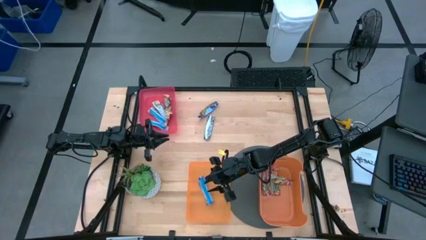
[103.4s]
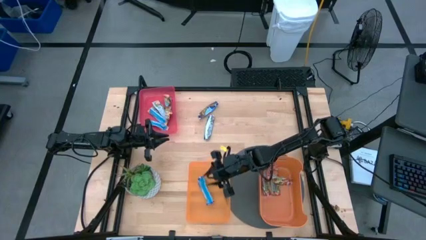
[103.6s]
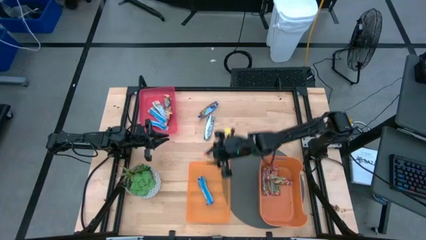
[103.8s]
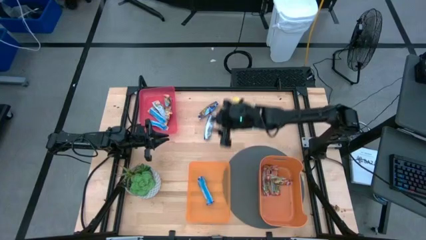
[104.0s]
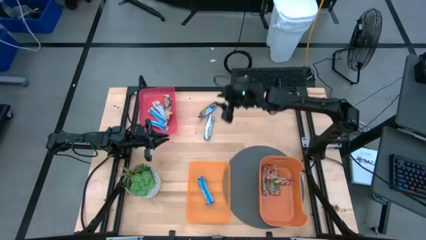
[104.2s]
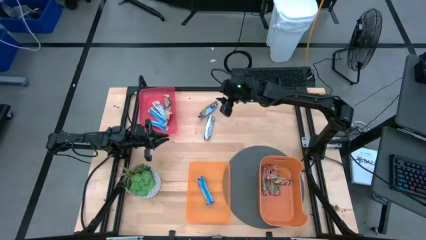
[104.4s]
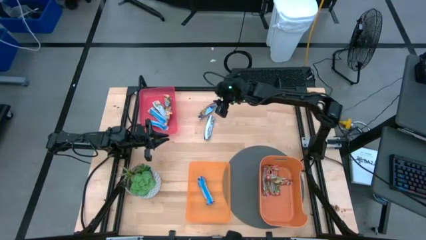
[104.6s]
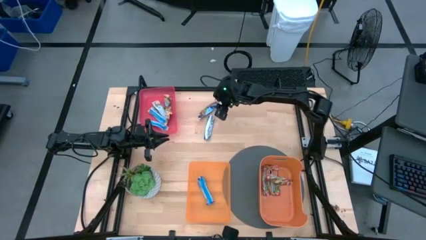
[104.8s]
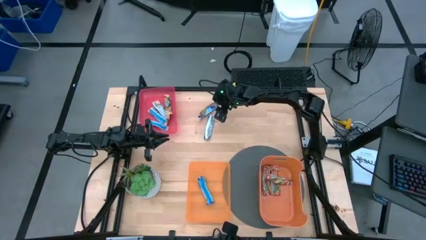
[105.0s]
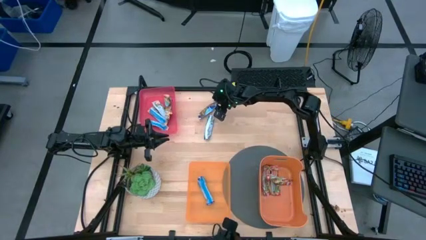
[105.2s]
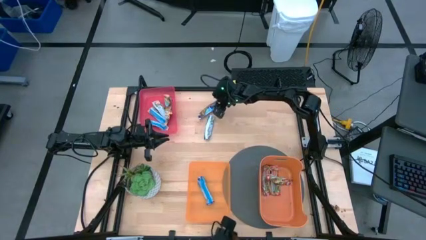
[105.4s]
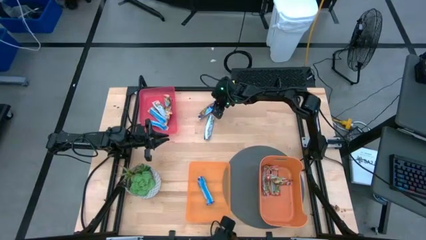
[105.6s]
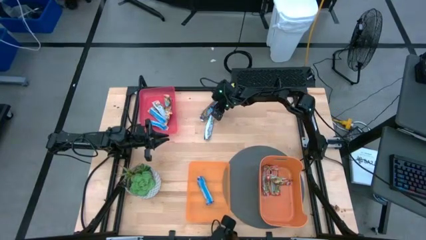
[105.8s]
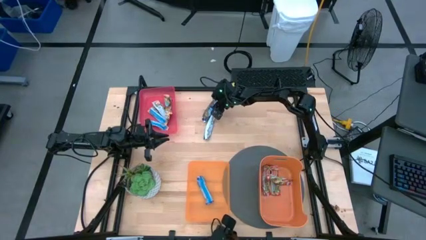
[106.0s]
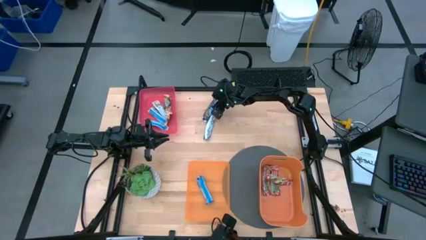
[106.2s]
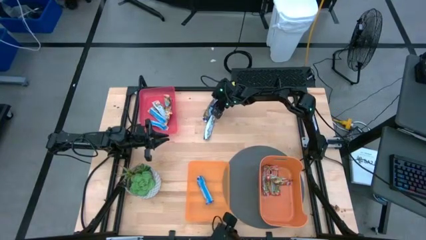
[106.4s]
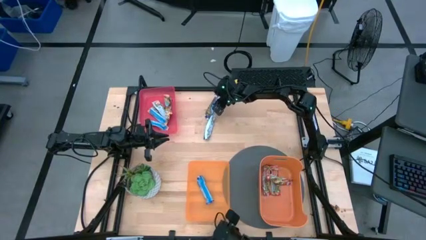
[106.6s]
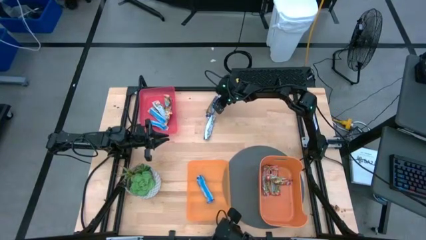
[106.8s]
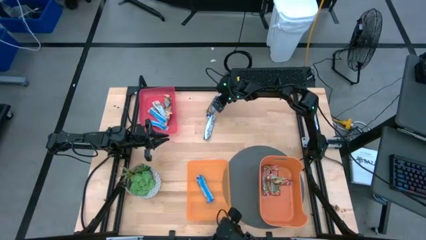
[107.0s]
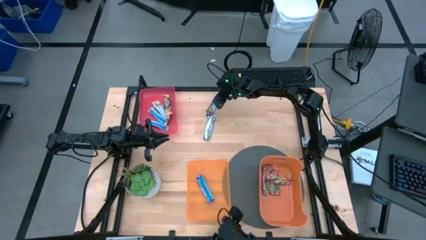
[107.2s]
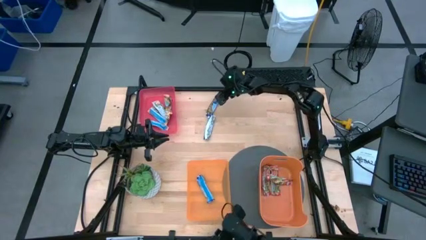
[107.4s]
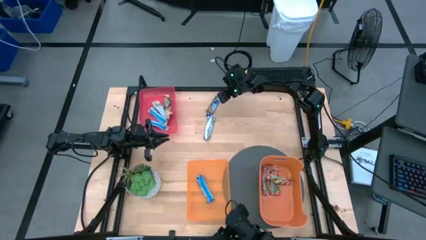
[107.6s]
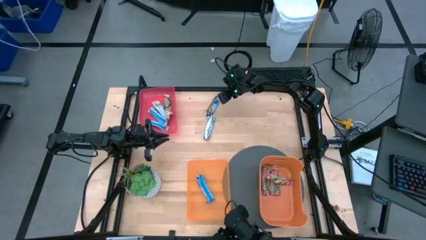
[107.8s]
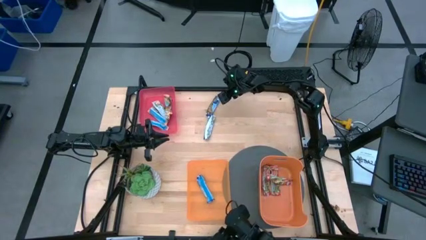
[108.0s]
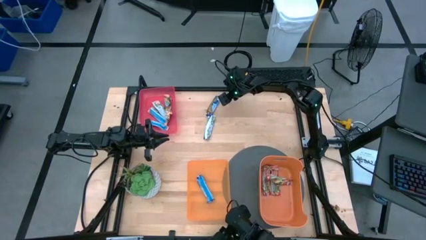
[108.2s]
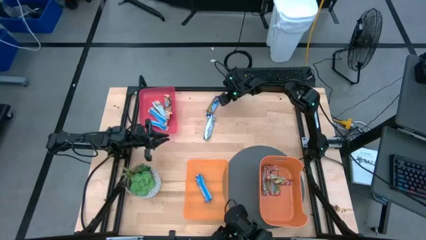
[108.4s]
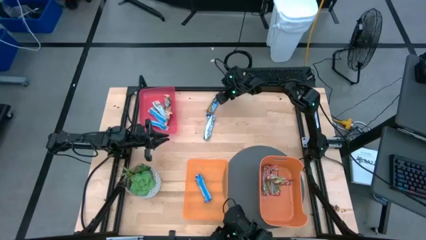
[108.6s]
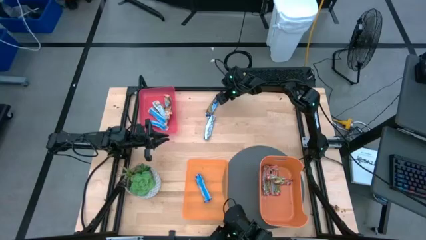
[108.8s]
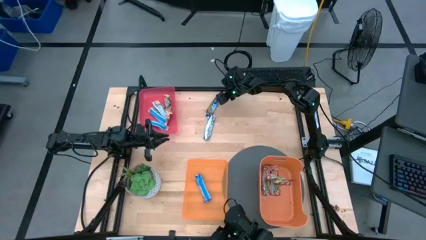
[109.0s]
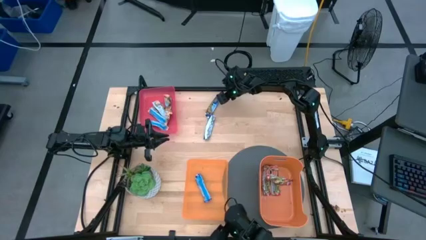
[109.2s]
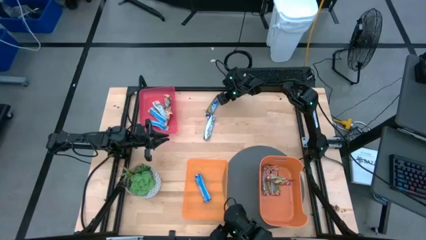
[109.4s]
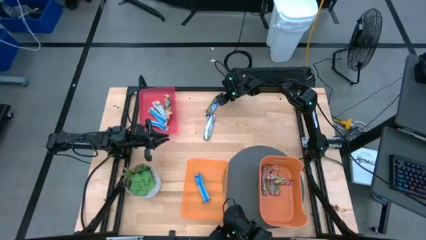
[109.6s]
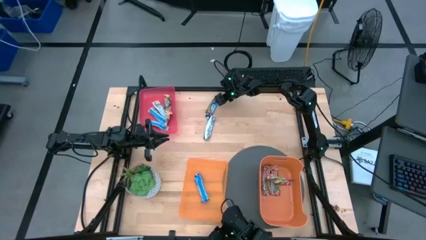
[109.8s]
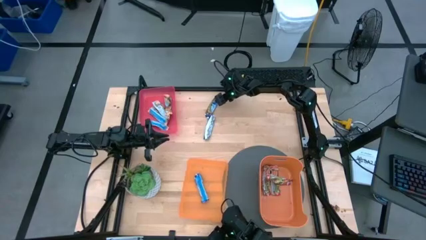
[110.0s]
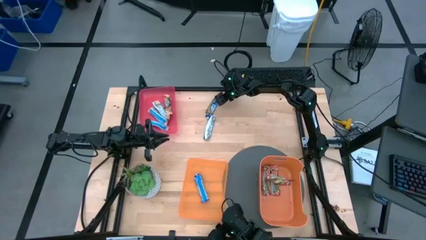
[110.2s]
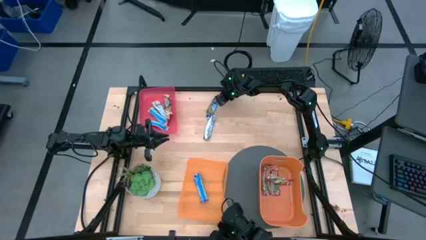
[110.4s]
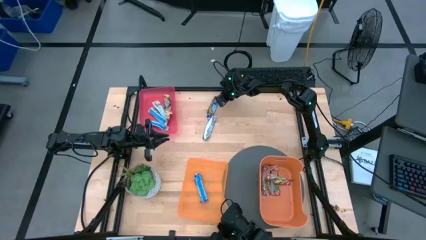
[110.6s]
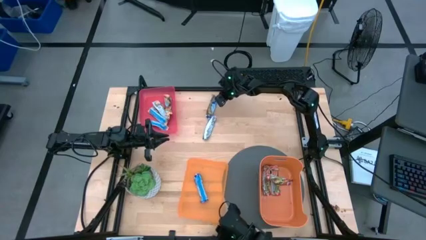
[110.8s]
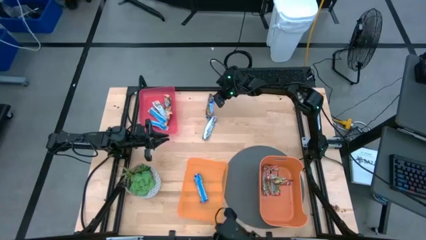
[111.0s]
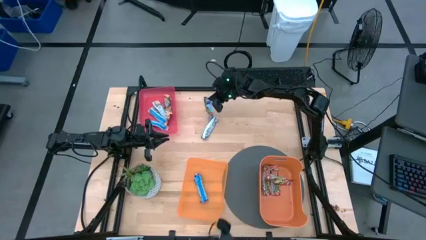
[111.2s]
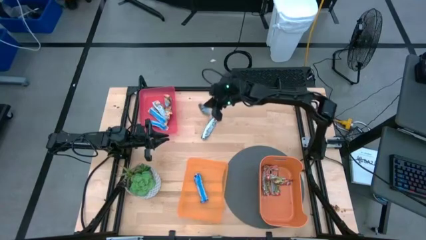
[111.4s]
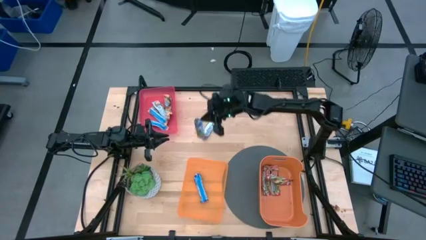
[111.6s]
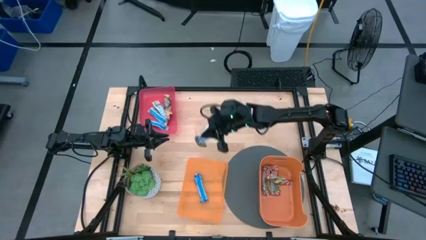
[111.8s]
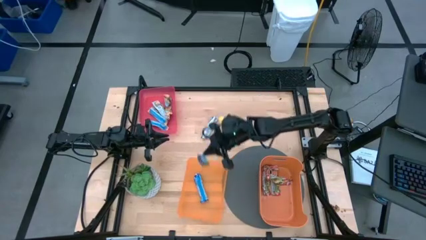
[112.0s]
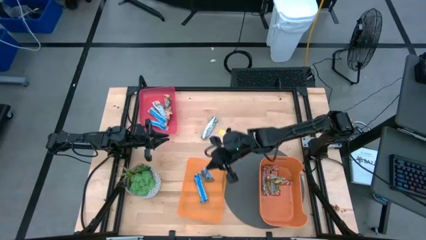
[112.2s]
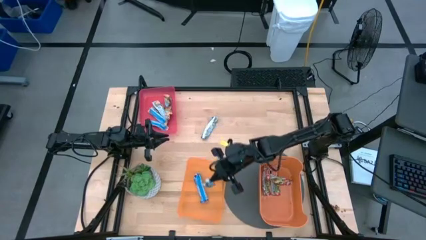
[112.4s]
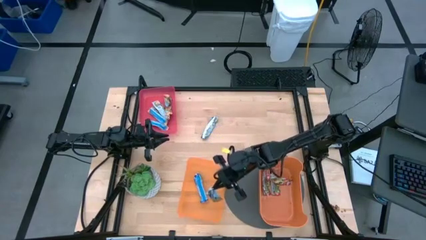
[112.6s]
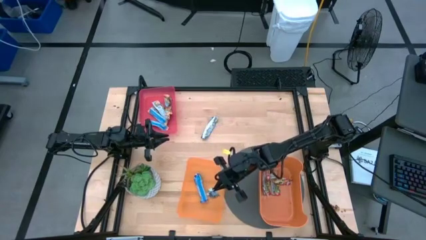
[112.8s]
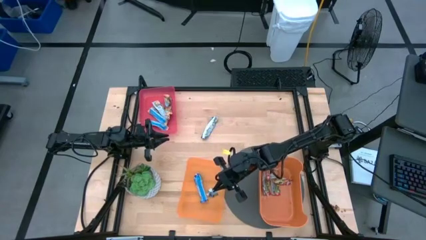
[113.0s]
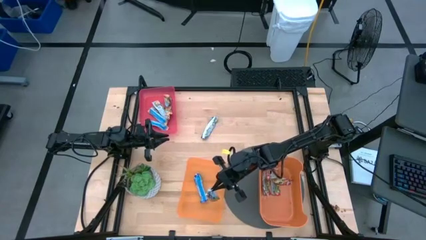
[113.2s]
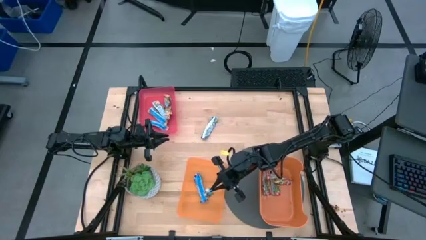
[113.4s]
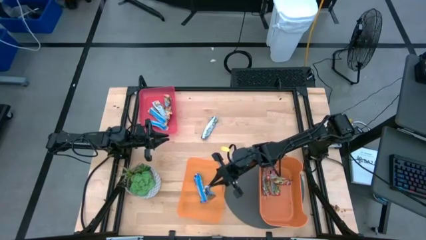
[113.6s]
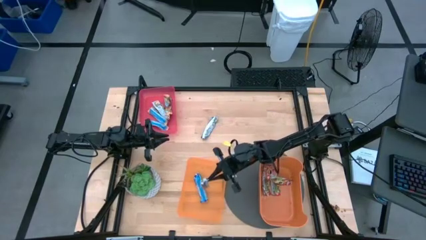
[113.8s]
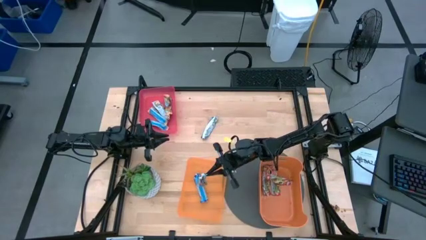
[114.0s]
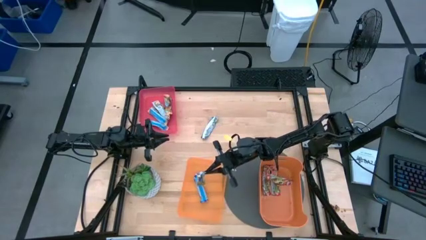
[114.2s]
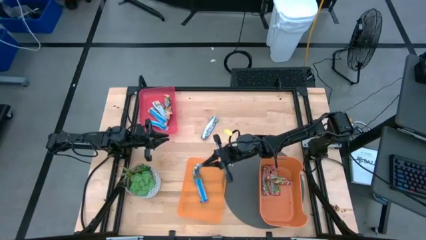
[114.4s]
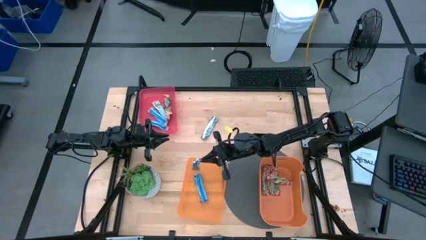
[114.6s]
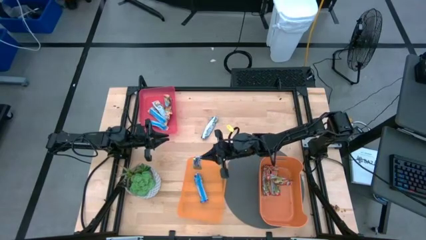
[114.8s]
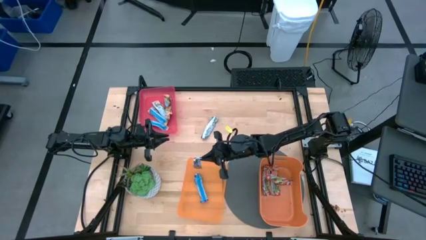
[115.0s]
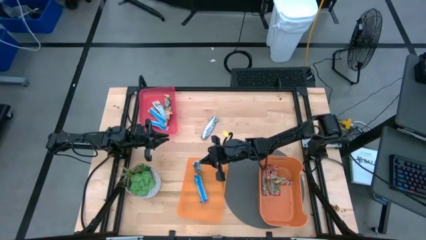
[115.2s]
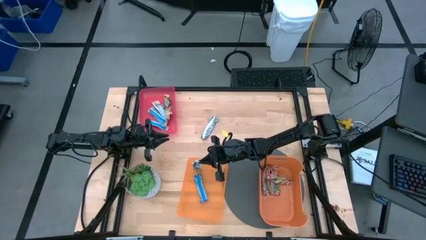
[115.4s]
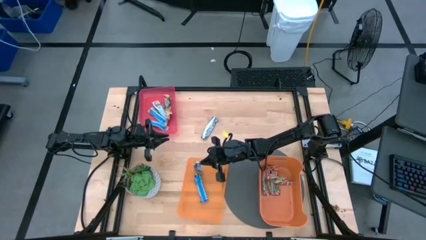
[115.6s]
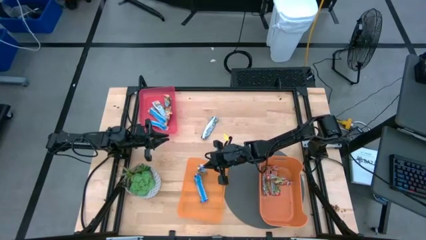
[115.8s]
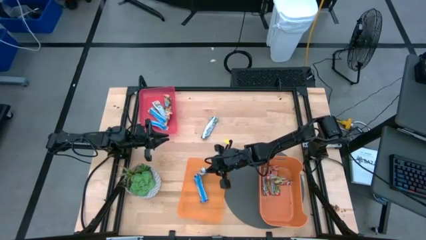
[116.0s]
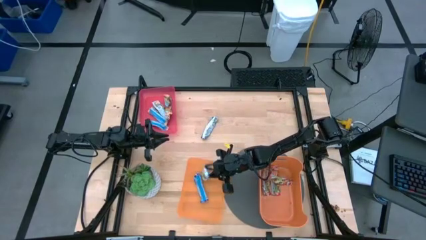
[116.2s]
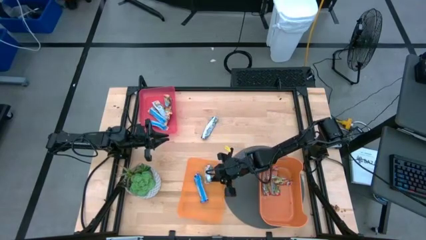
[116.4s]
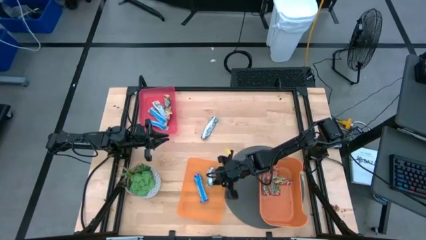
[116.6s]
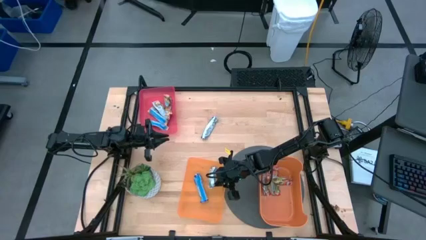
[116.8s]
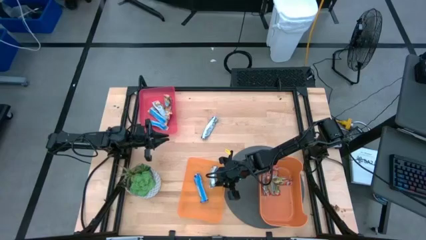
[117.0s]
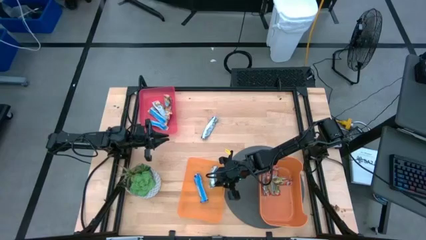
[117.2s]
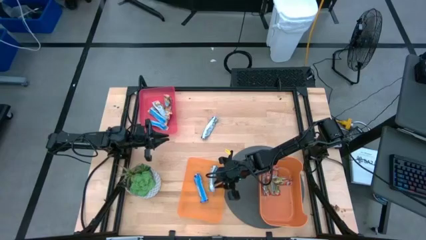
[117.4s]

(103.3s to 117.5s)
Task: Pick and place Granola Bars by type
Put the top blue granola bar into the left orange bin

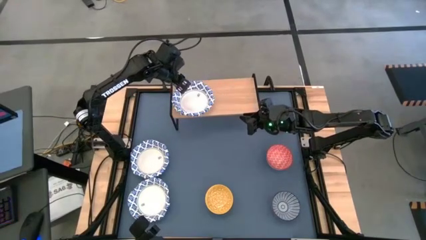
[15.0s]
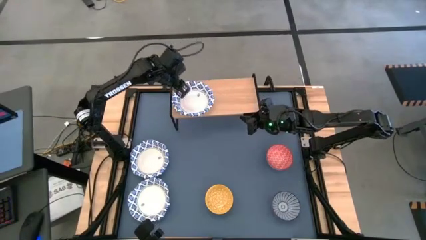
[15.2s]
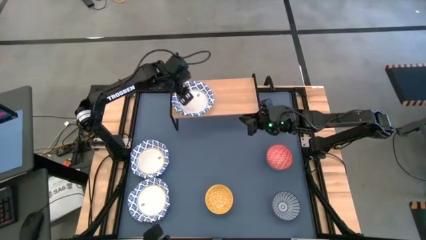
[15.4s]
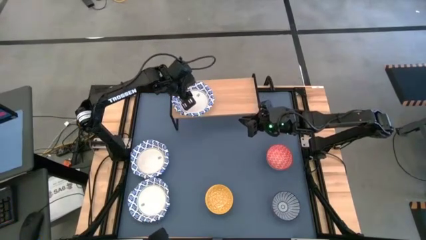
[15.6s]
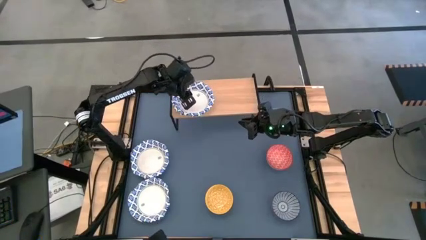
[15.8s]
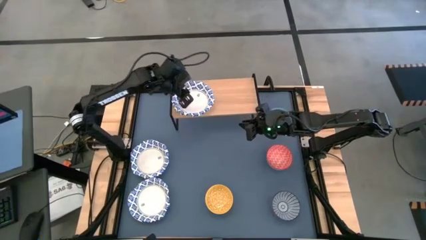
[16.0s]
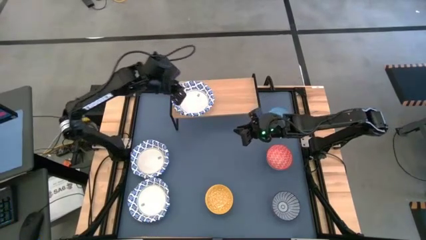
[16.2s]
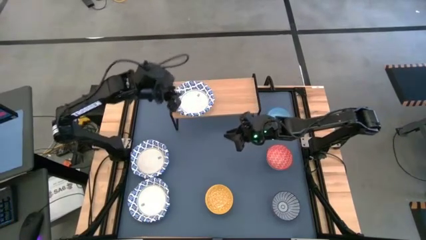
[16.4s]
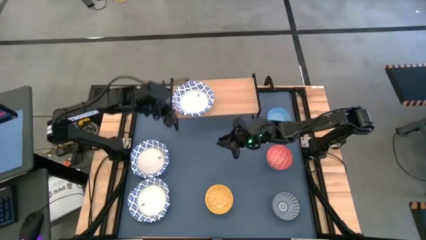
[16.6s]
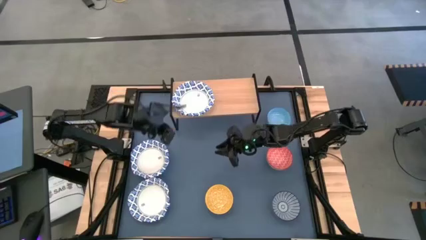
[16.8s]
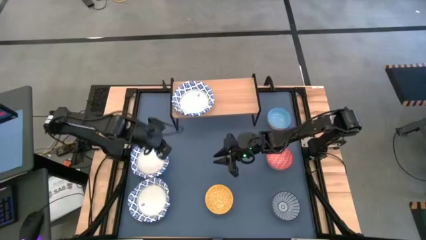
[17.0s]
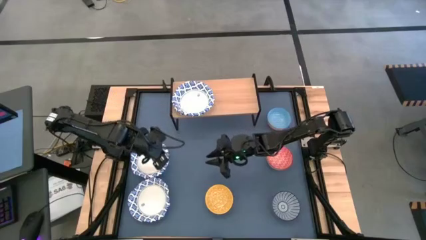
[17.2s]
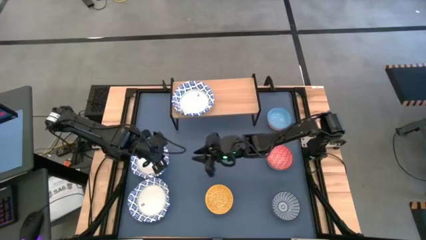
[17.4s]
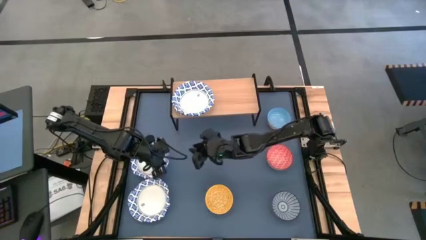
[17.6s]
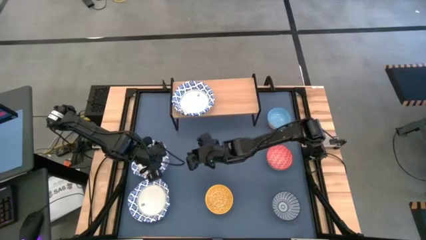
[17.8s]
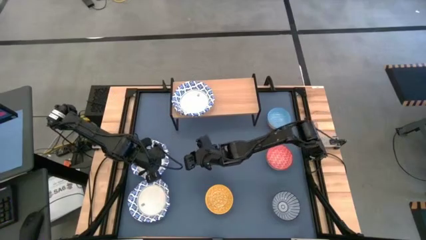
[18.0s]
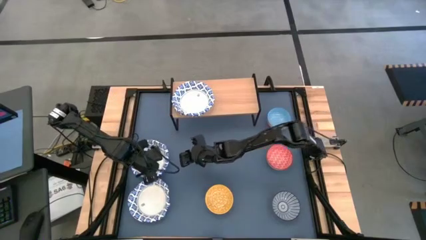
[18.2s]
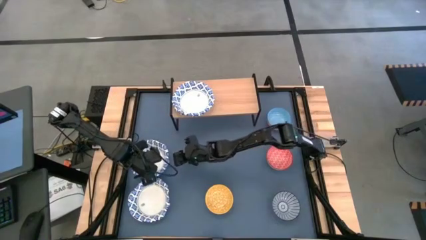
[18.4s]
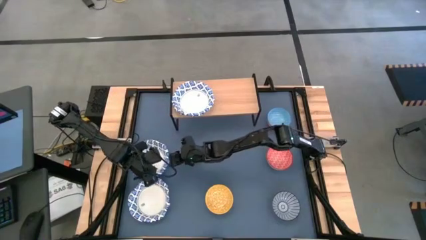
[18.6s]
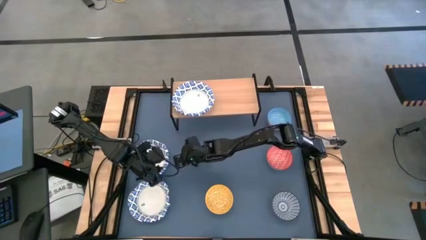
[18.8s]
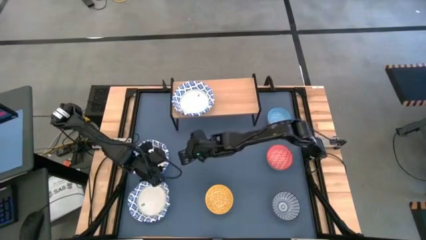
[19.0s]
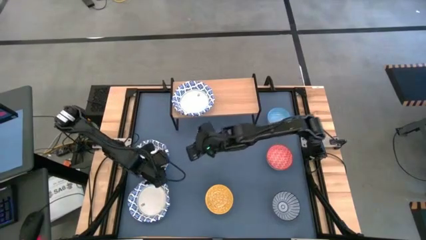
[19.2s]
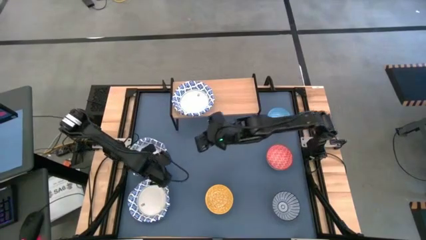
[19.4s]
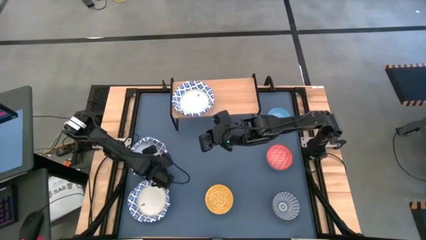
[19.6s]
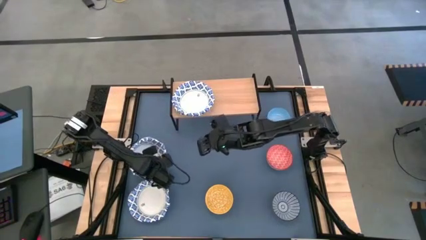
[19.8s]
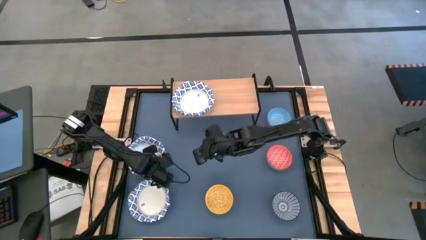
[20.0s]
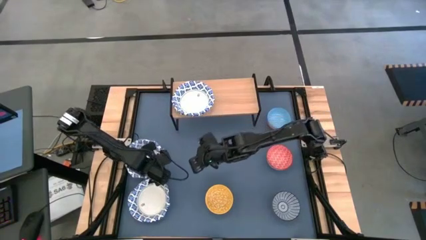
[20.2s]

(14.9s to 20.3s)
Task: Place and stack bowls onto a shelf
Stack the white bowl on top of the white bowl on the shelf
